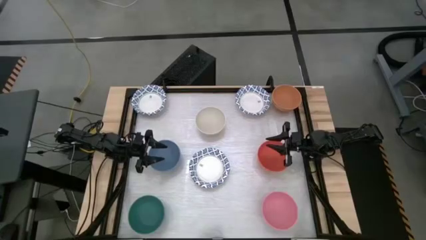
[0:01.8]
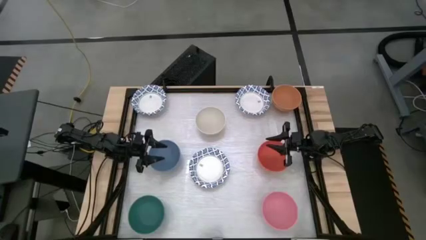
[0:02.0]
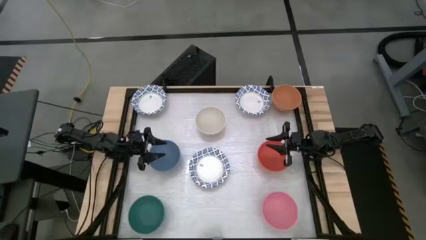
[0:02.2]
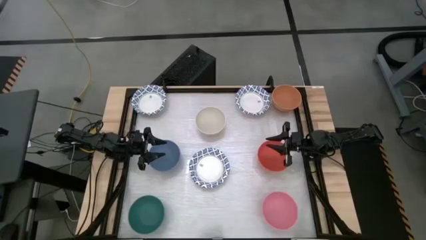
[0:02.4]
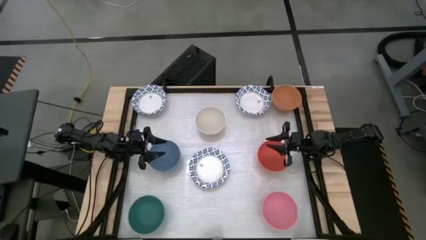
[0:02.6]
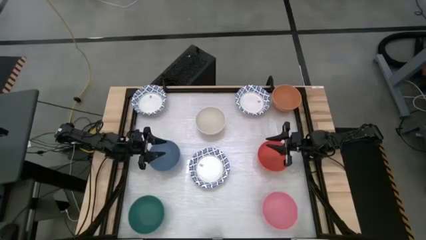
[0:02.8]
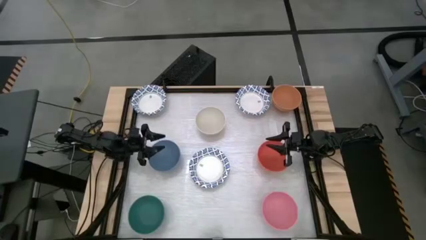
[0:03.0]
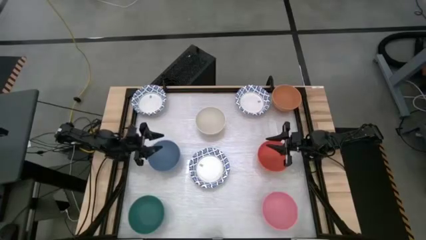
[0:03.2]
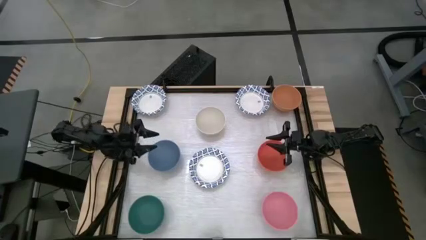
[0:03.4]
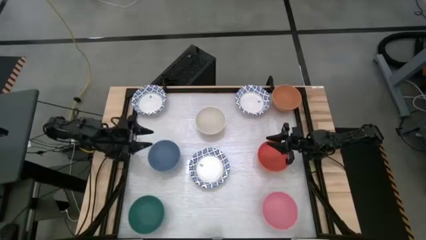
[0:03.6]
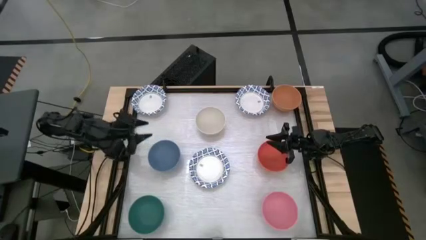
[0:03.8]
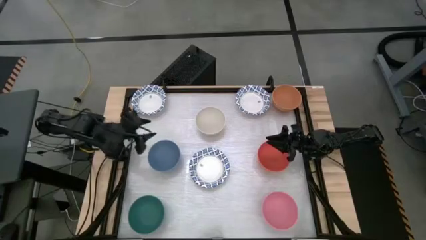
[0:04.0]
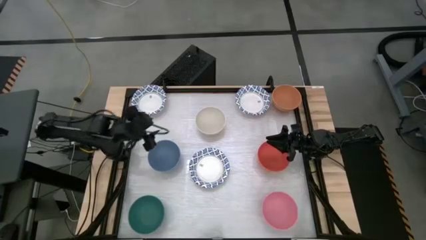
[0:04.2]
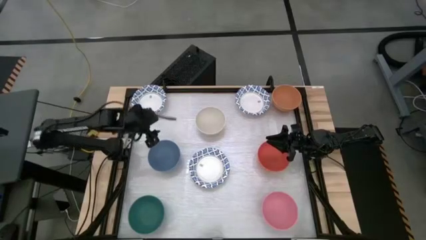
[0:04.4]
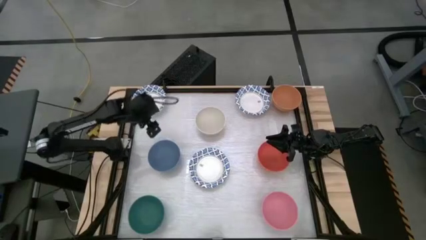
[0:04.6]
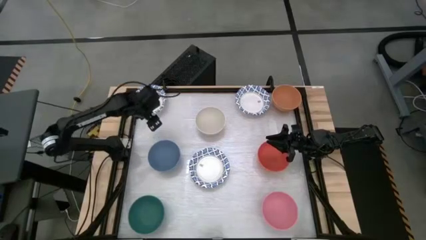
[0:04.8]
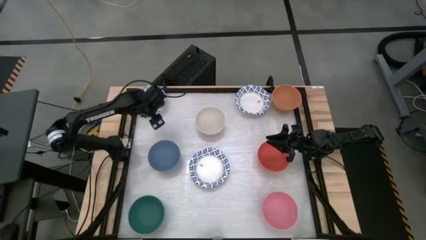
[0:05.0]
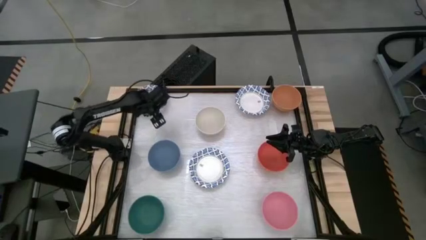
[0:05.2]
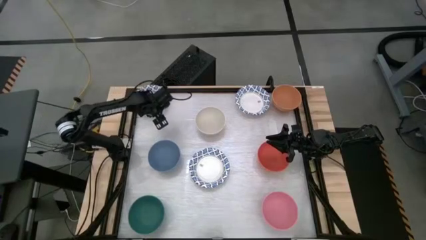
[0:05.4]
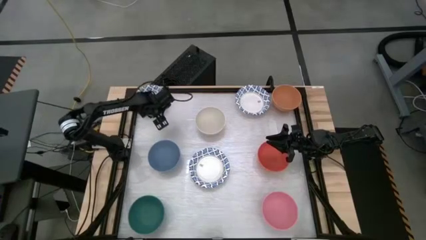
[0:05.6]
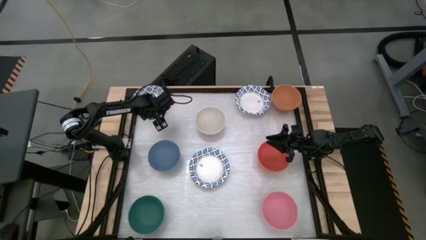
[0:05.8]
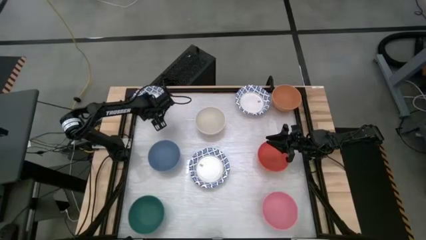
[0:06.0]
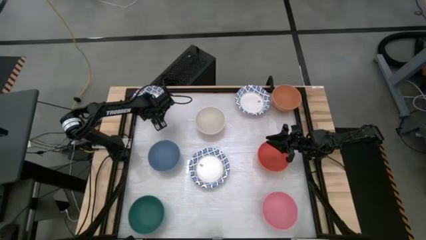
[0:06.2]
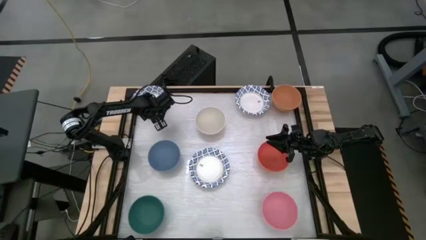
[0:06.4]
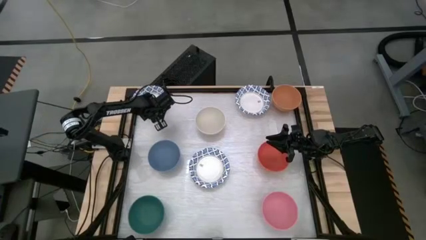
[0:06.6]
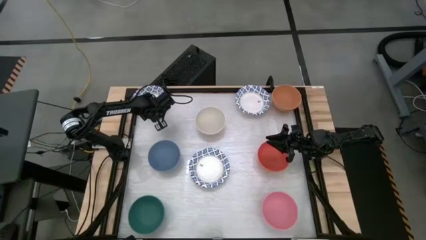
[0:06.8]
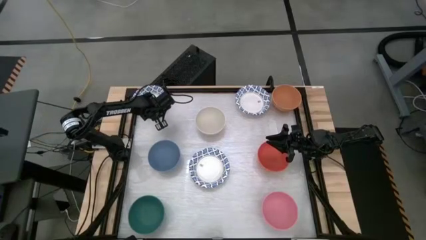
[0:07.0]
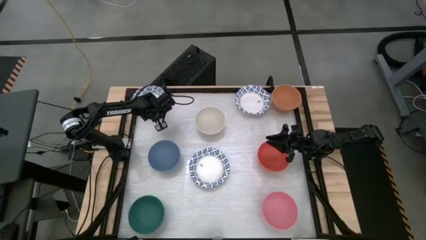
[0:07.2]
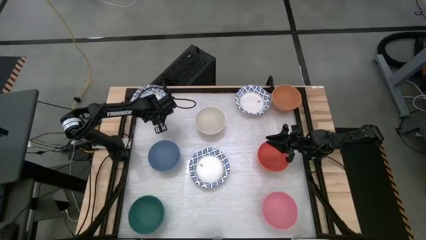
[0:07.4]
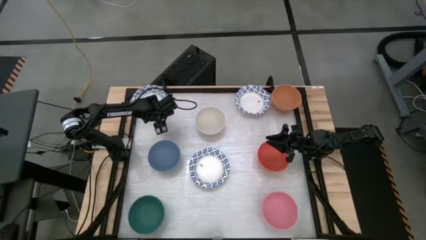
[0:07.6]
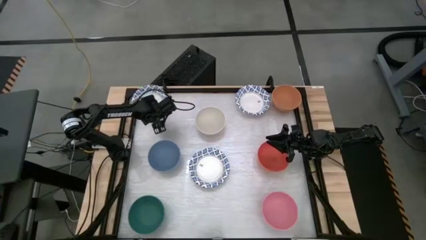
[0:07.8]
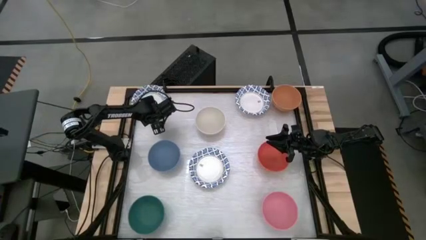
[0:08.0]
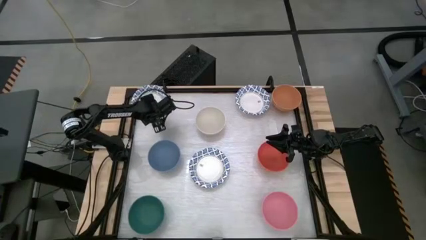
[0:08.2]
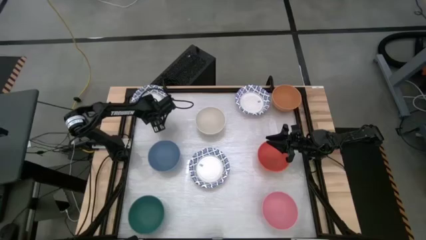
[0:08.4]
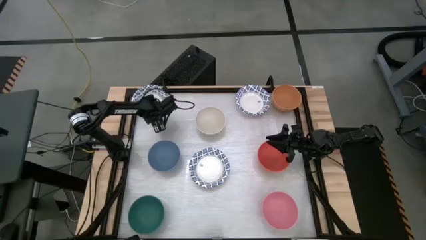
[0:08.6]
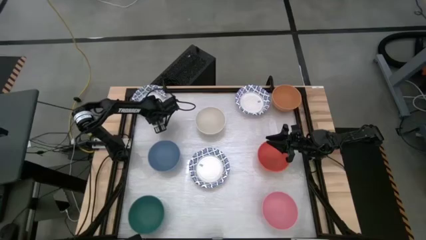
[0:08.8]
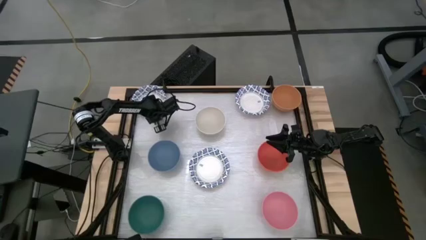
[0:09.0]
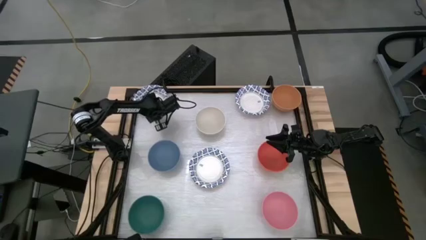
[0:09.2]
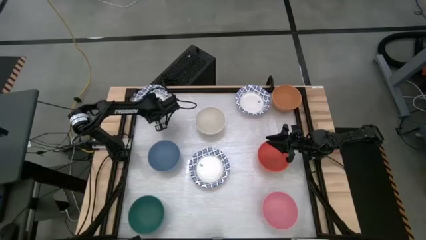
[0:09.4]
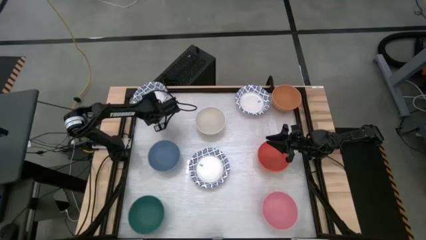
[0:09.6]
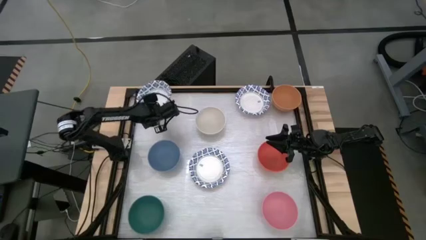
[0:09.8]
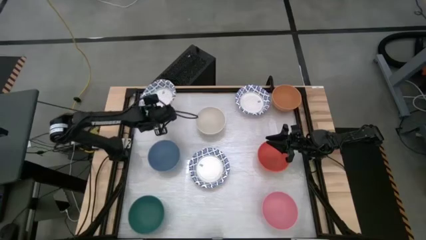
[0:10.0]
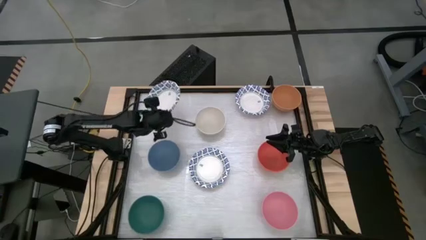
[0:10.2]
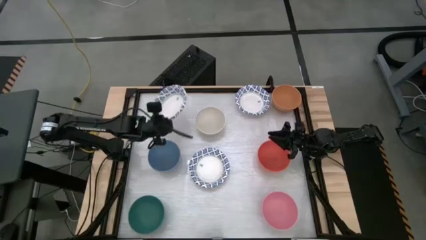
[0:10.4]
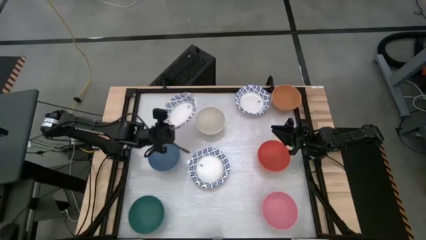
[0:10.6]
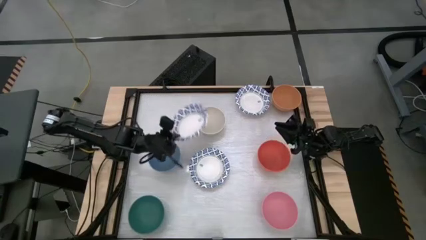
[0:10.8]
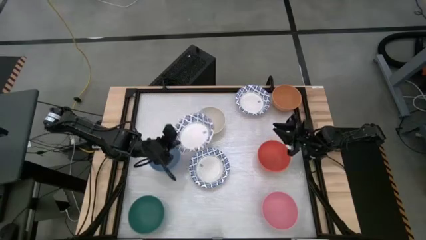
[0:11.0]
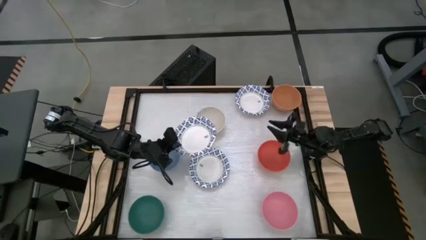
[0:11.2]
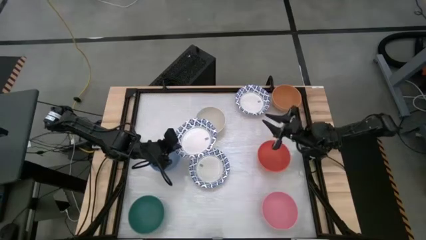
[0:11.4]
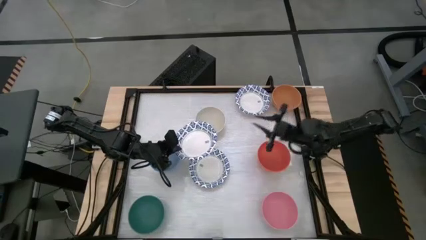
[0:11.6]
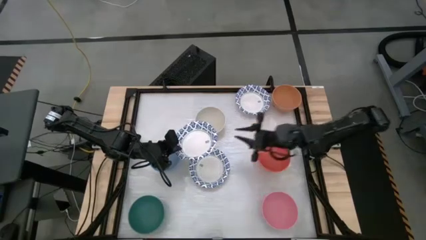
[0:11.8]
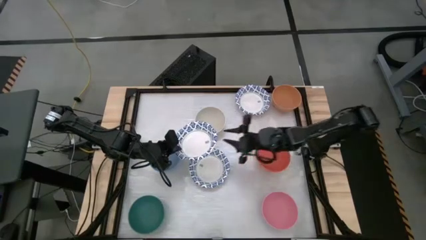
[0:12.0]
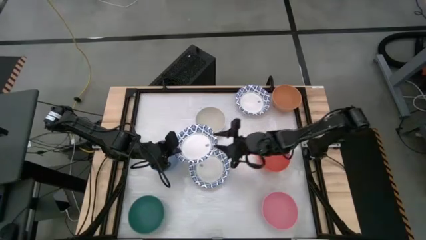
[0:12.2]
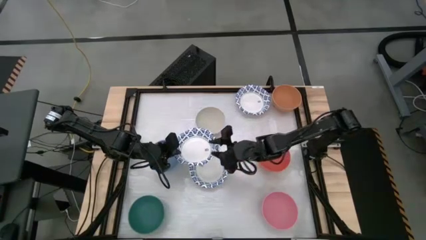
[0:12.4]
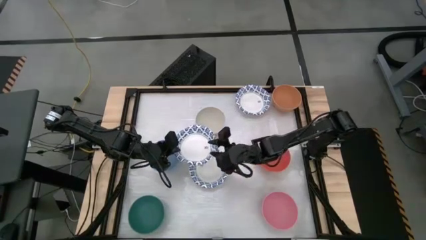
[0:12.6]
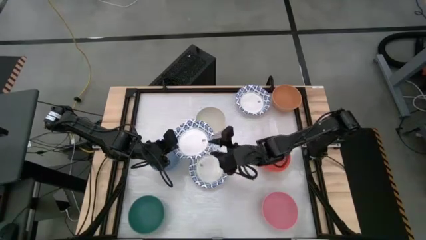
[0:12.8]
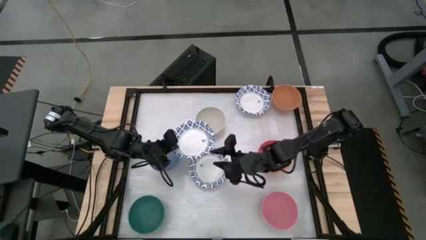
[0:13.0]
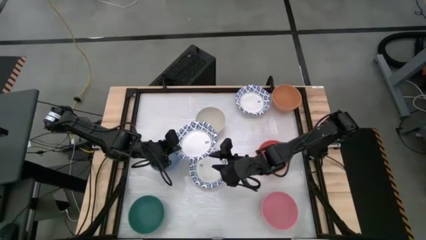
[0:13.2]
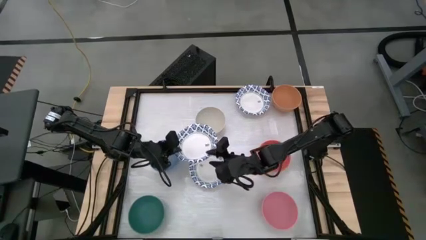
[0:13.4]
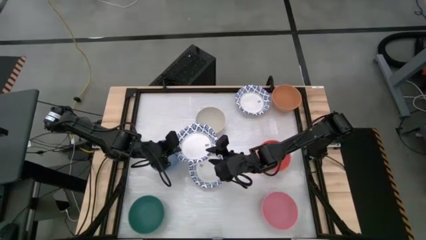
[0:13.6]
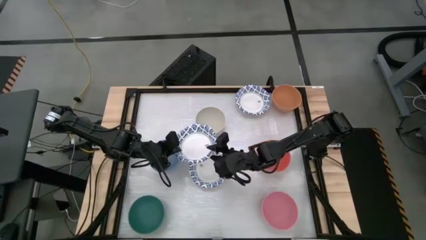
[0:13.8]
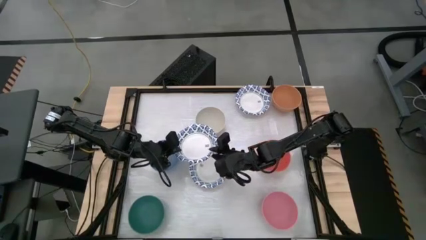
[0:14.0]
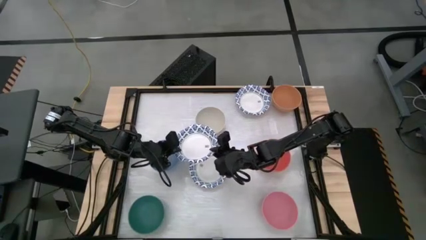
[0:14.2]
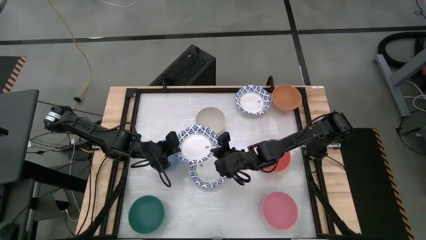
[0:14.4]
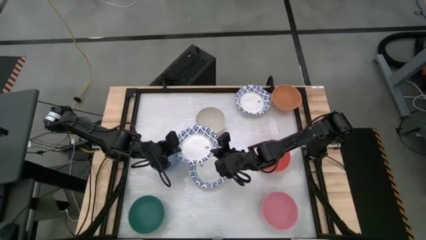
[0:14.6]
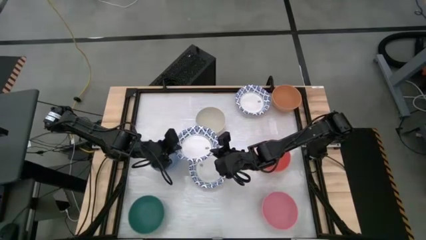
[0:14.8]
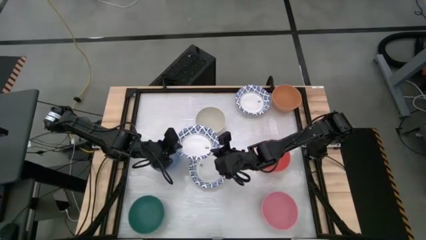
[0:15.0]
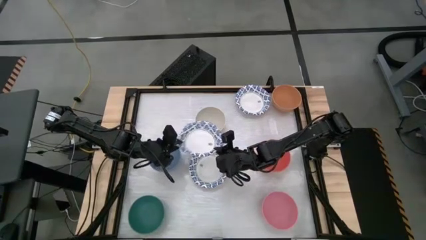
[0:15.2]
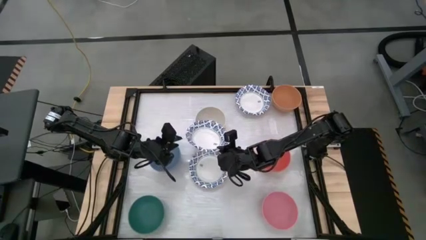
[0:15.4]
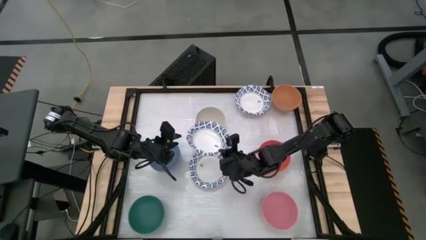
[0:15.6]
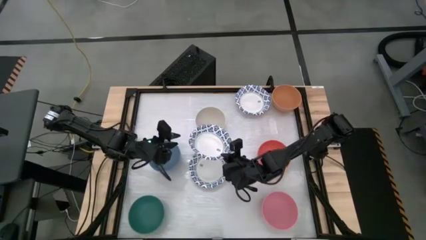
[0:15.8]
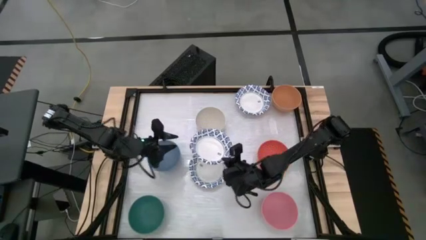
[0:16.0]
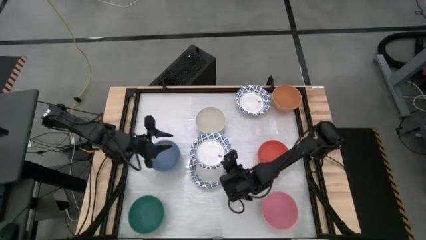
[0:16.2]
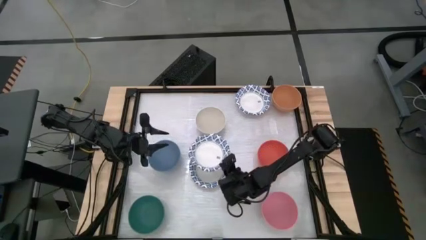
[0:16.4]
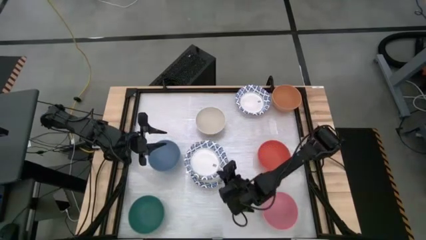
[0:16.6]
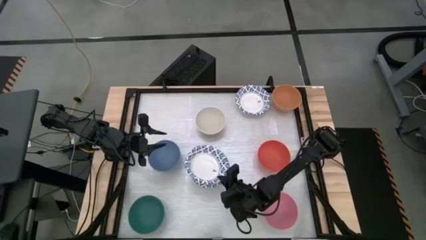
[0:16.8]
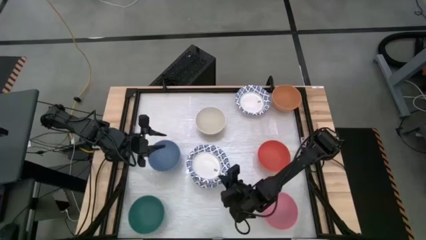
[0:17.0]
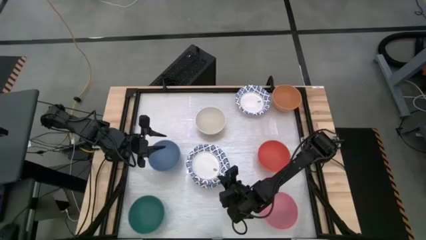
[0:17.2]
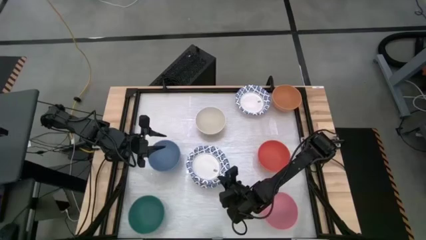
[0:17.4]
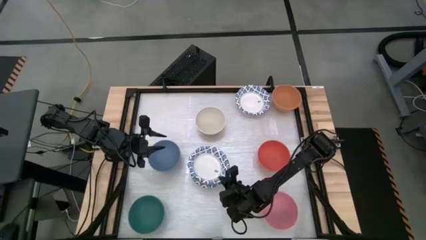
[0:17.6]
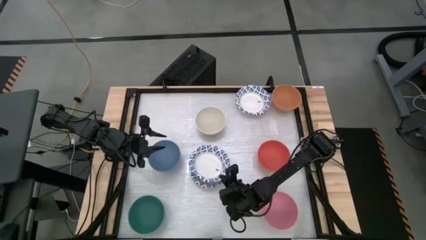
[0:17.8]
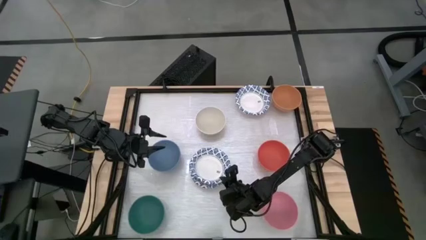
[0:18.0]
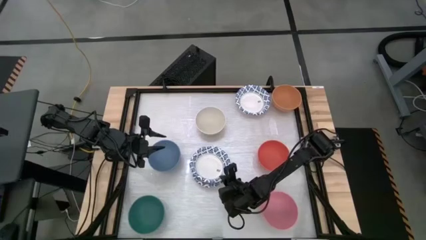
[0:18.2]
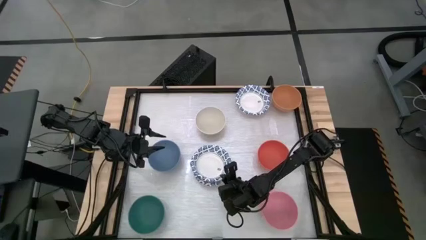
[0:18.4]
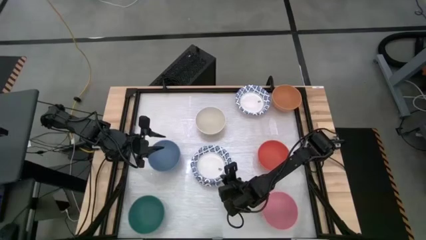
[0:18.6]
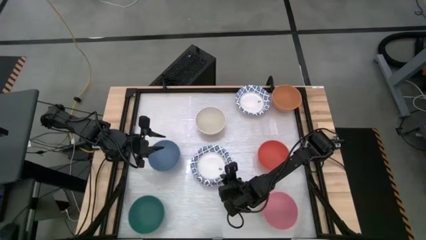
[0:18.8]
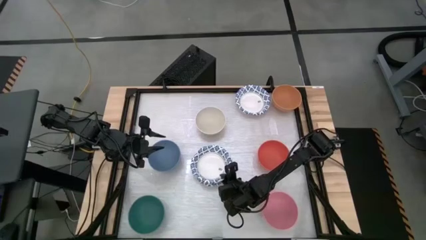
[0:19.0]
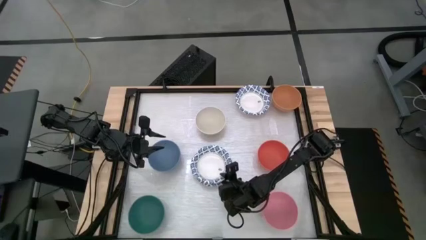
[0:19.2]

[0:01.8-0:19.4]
Task: Nest bowls inside each other by size order
Stack the top left white blue bowl into the center white blue bowl
